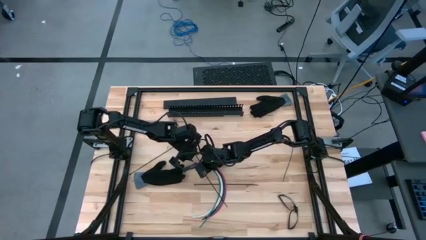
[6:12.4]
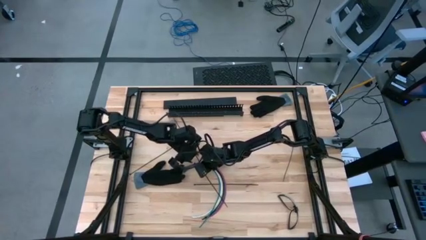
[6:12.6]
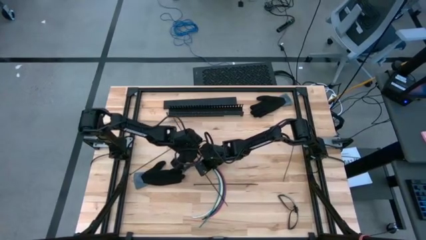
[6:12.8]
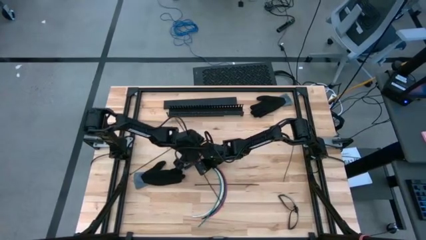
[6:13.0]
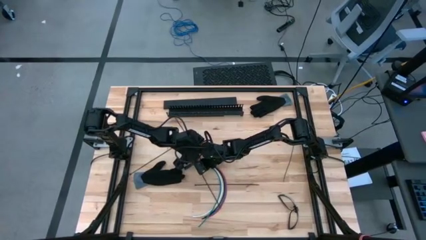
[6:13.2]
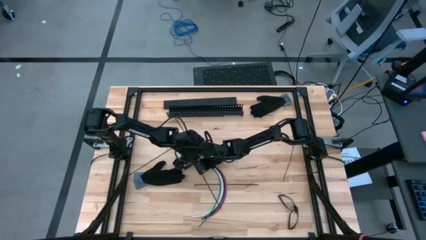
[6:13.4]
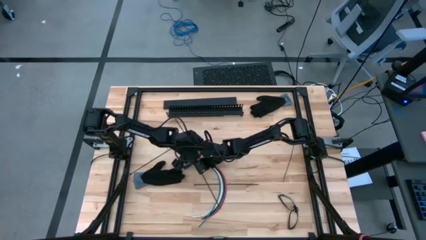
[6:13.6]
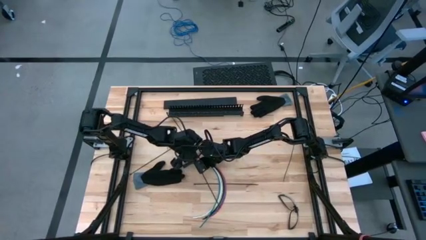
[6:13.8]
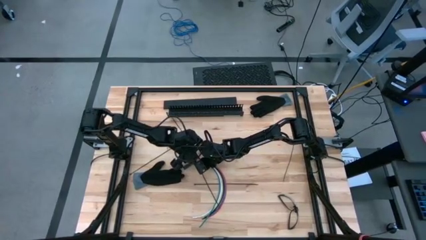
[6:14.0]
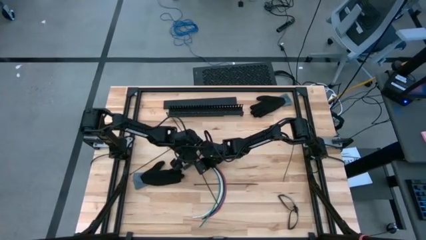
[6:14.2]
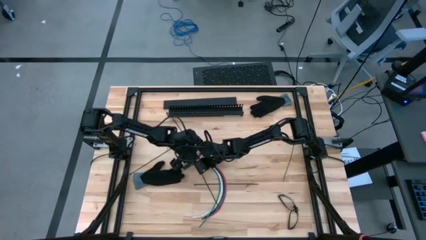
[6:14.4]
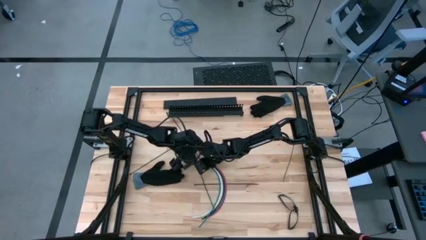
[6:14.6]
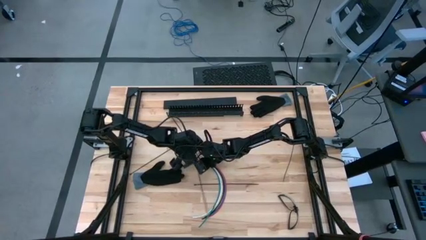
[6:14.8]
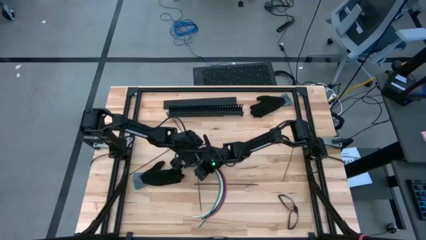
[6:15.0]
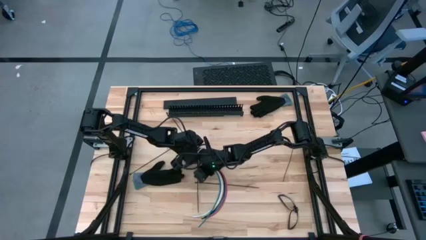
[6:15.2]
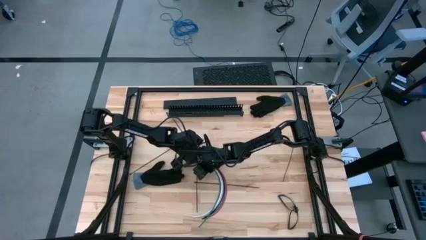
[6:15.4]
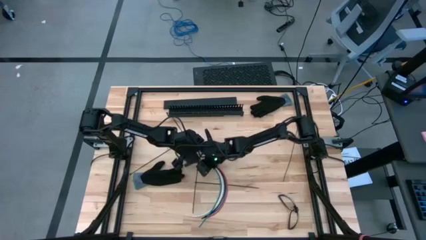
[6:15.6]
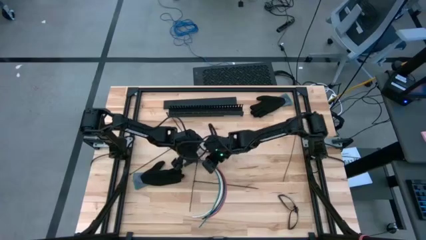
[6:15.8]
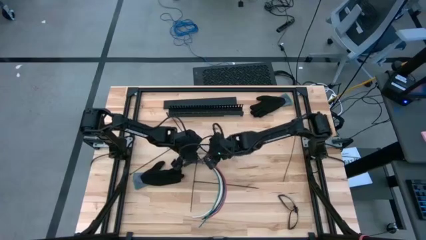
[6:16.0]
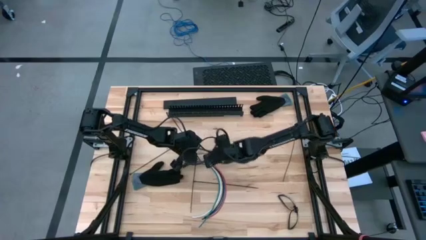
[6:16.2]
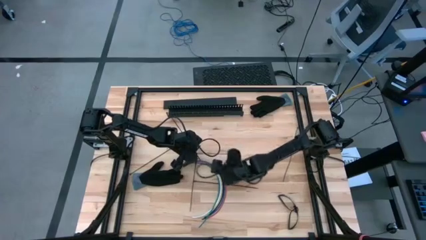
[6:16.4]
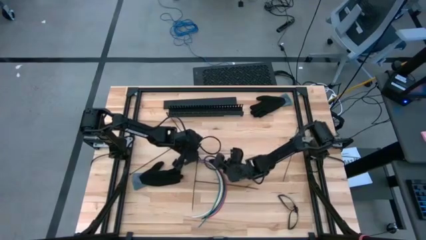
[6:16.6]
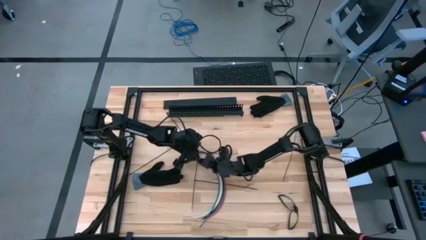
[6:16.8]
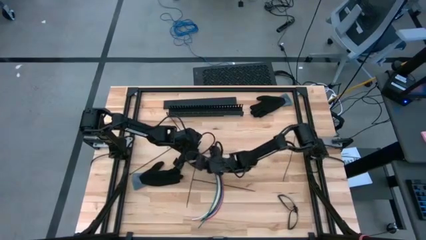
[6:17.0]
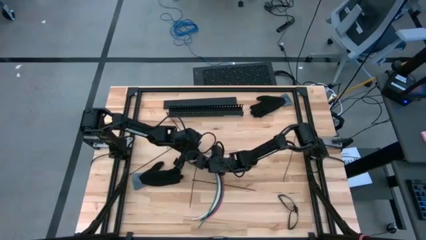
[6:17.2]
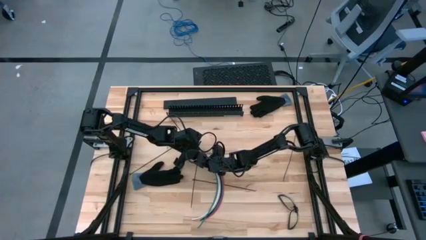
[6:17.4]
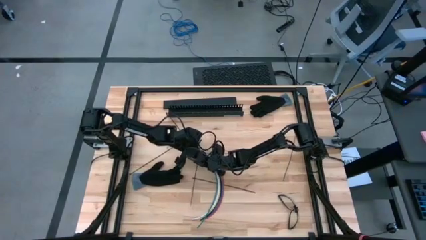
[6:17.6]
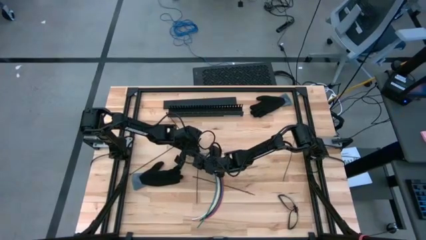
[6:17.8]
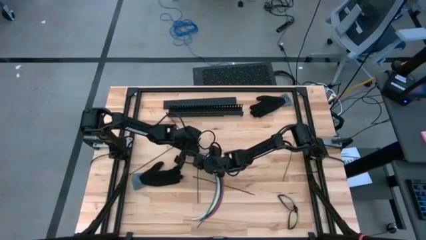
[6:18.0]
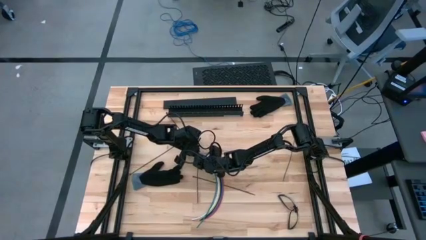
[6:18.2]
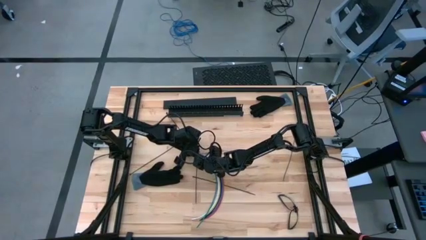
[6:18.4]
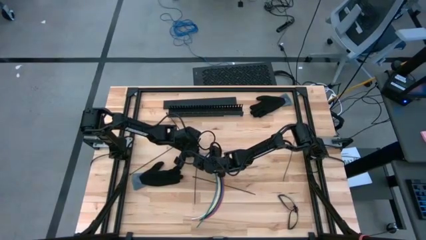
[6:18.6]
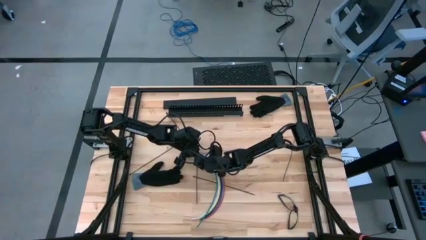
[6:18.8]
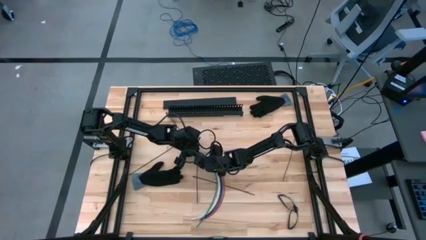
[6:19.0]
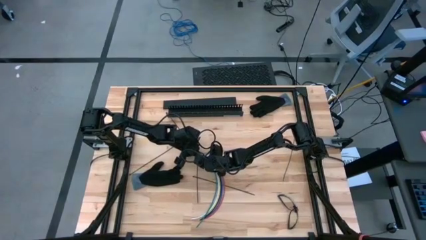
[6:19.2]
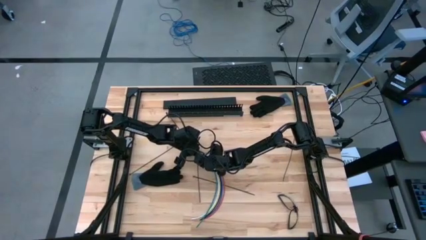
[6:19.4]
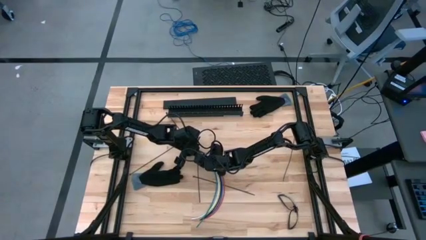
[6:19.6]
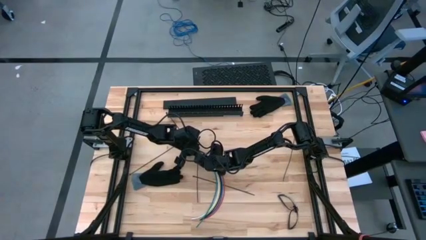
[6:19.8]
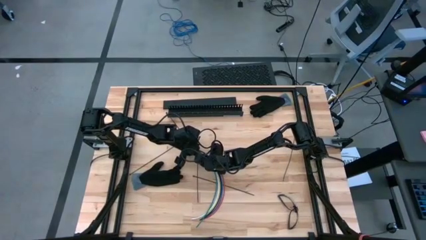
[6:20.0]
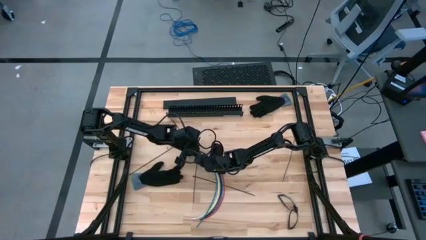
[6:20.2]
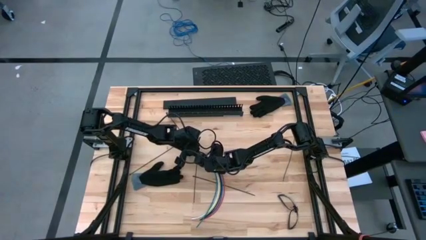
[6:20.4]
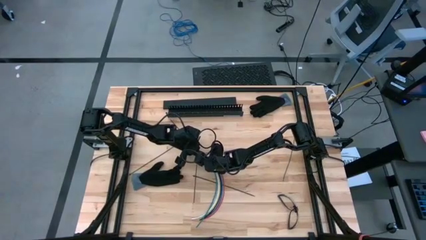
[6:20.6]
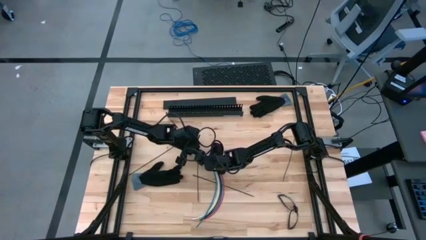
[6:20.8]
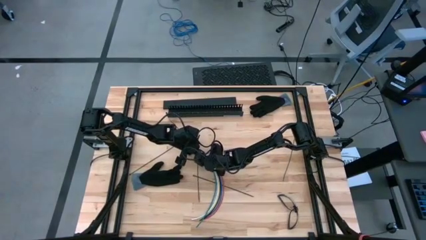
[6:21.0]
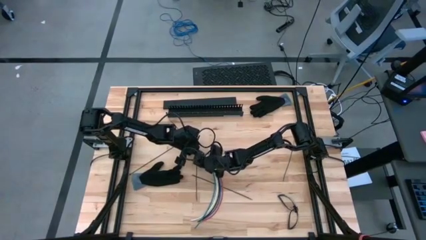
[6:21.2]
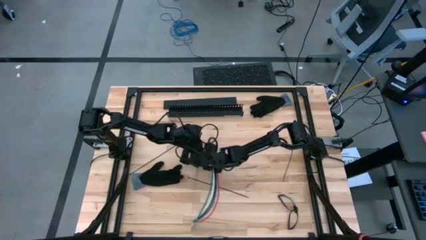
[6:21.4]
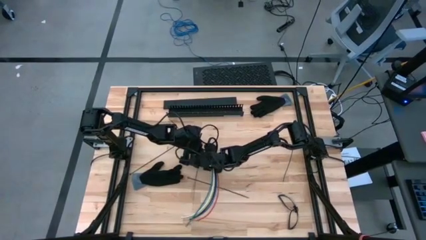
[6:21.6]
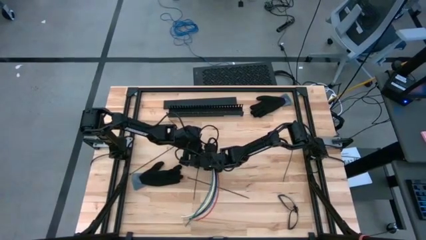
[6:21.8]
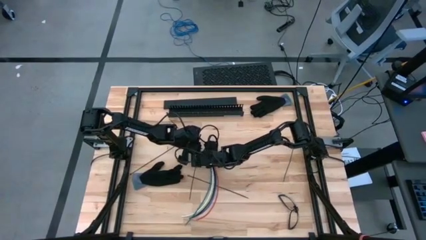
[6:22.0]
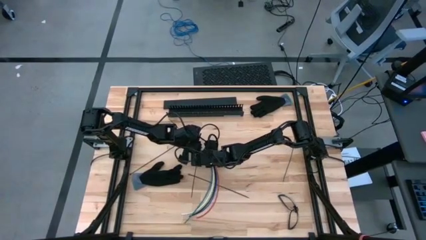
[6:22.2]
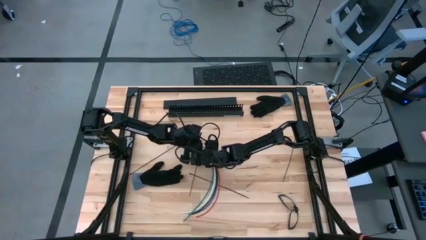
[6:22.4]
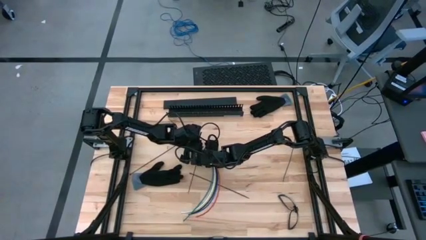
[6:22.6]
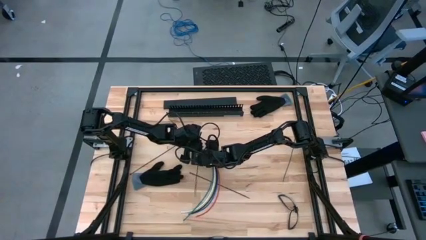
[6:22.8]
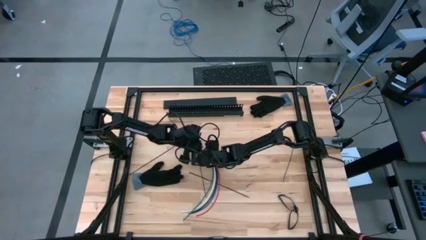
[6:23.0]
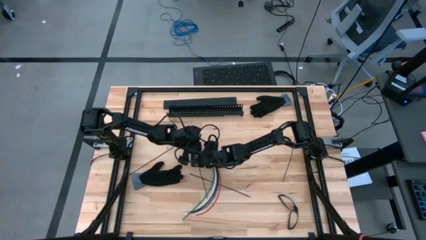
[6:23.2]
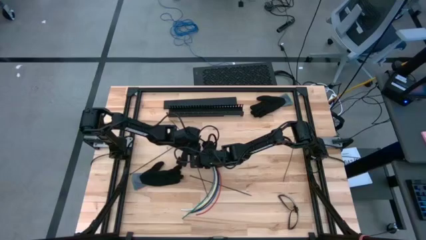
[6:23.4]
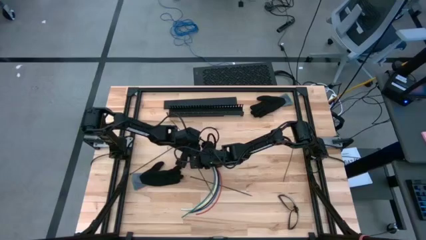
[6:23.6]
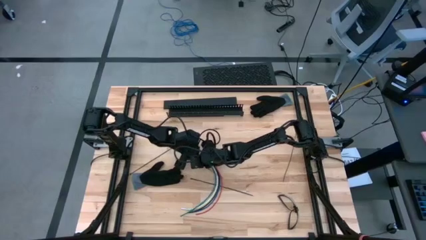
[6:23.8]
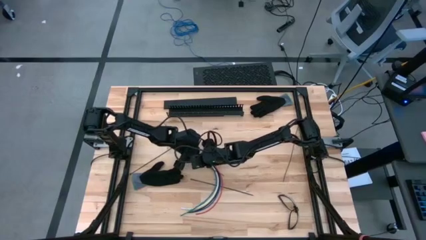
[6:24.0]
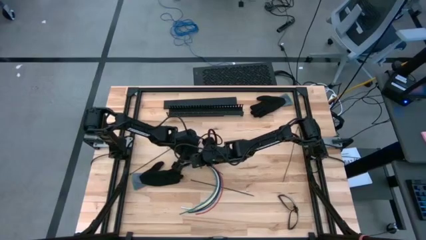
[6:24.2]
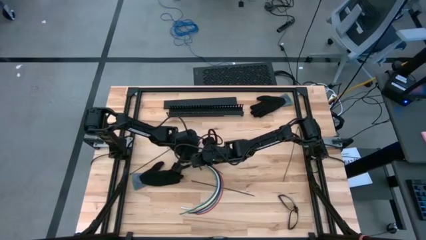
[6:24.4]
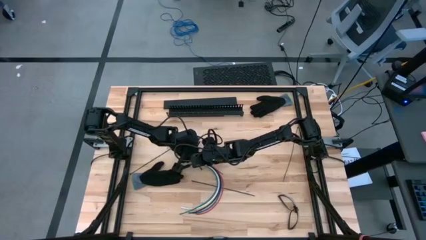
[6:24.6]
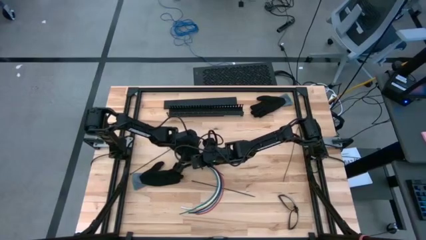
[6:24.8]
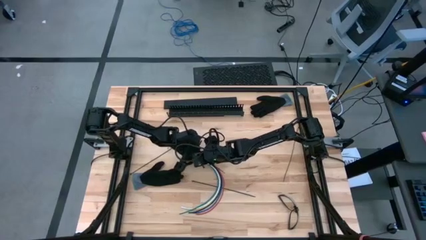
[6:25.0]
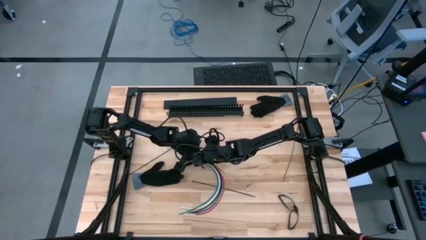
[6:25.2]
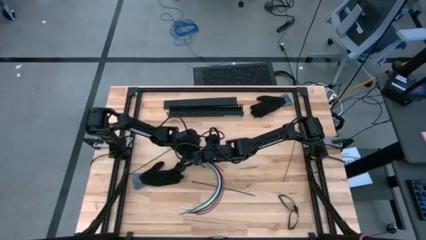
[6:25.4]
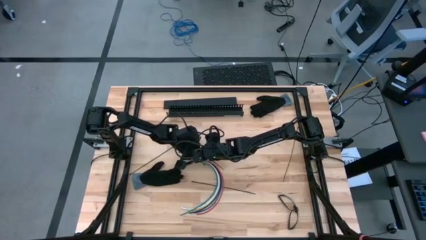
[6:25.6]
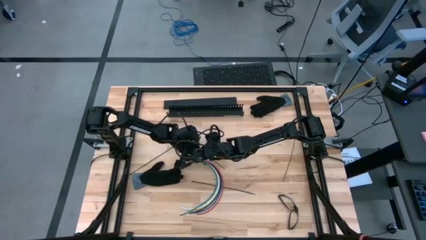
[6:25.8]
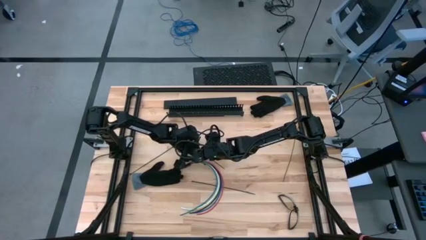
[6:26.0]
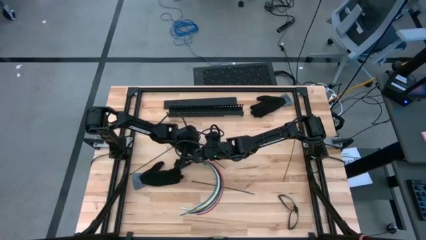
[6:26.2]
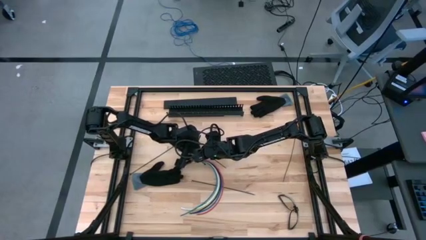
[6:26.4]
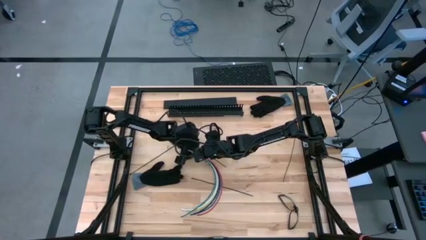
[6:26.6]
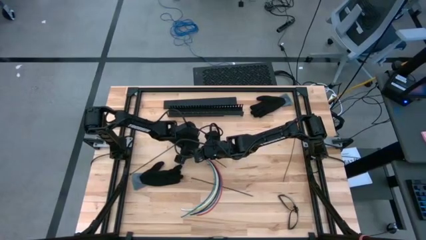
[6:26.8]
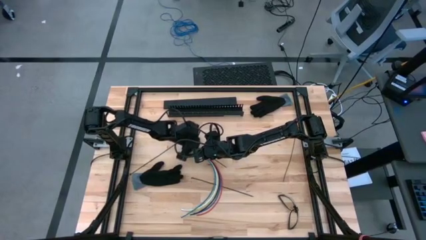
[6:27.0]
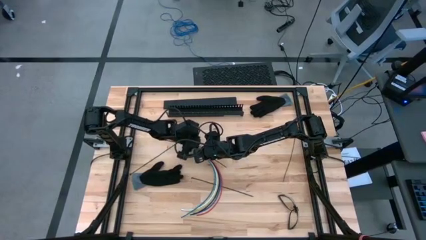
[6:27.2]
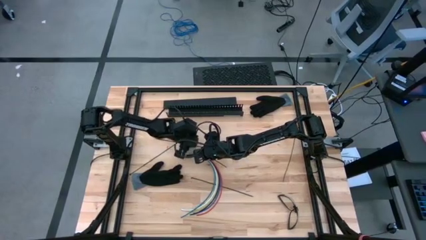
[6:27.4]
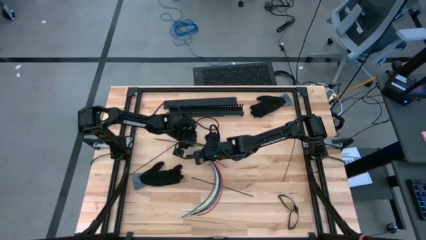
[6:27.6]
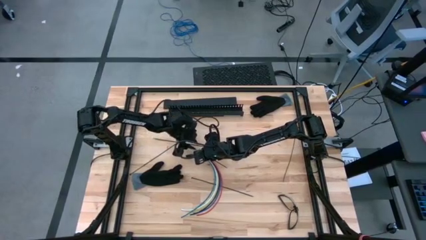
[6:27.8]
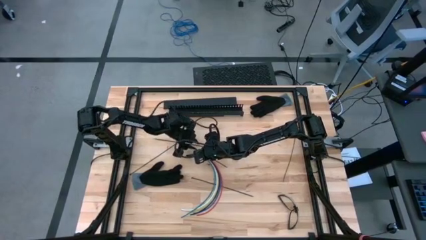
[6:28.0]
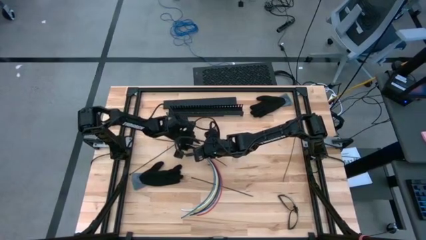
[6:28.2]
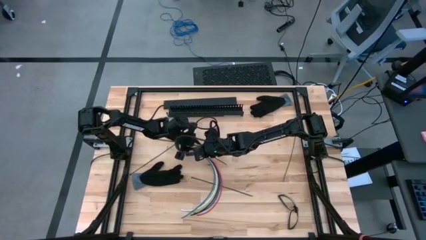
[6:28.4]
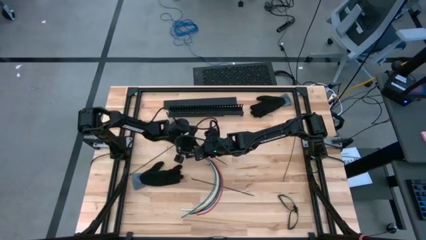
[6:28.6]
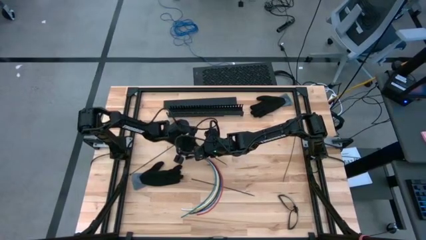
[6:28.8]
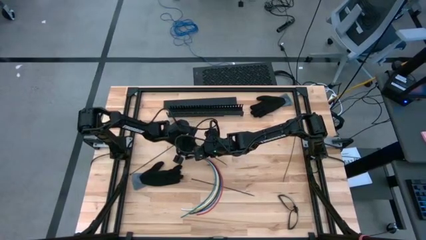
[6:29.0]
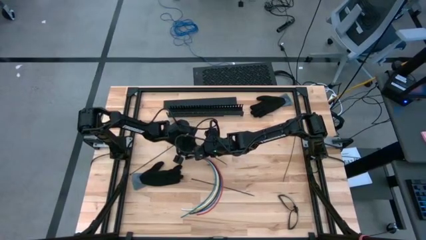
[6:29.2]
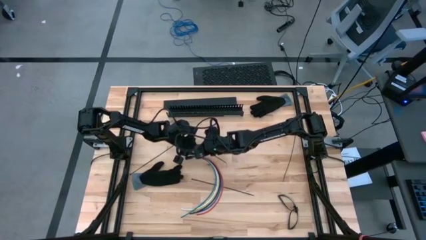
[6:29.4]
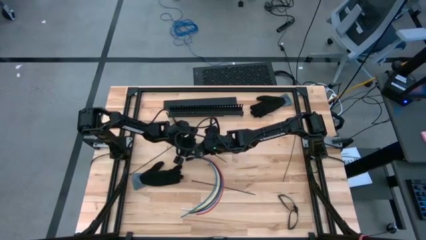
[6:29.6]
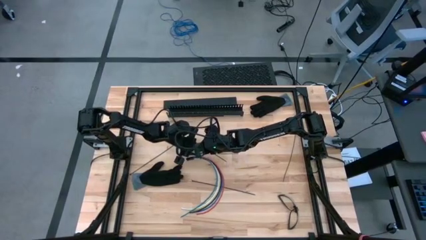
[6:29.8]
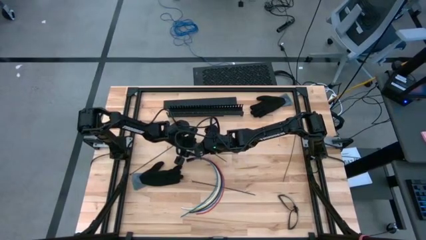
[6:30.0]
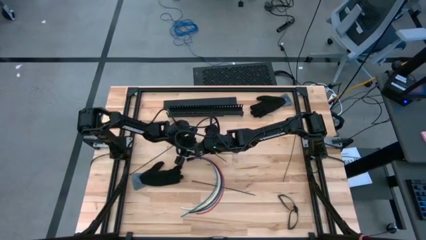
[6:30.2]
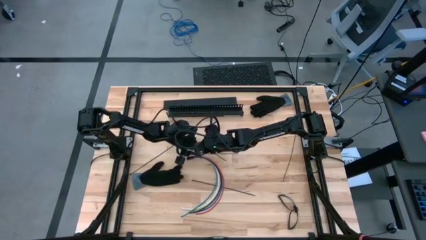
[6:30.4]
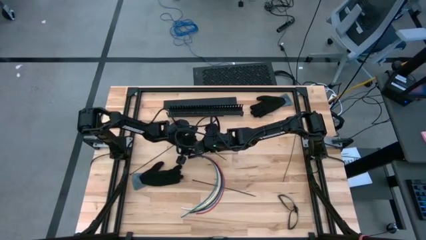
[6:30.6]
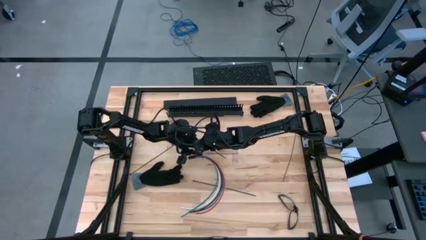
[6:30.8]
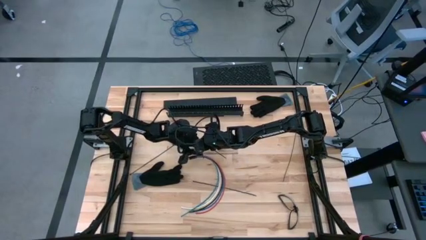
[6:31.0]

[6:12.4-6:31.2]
Task: Ziptie cables
Wrap the cable wires using a zip tie
